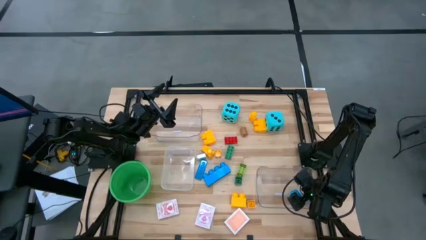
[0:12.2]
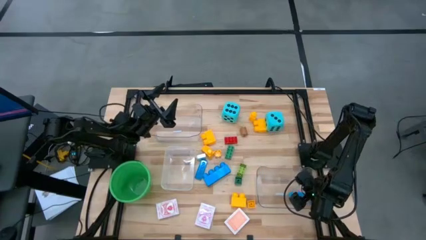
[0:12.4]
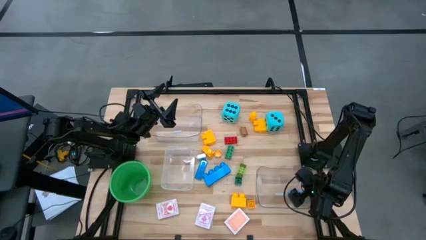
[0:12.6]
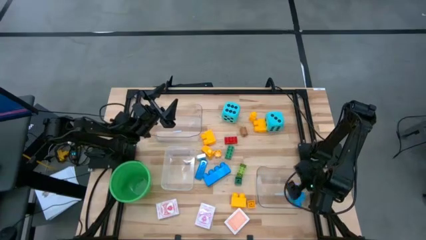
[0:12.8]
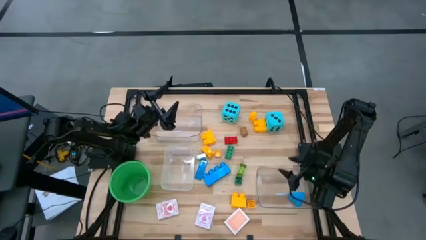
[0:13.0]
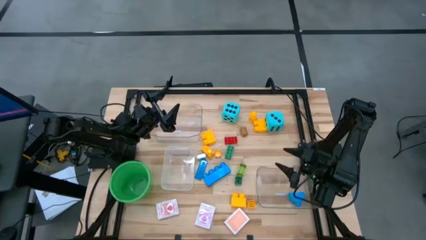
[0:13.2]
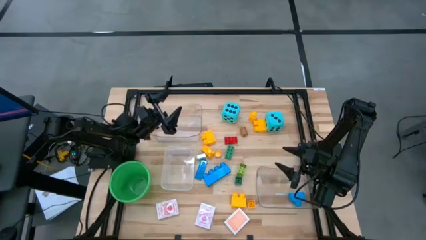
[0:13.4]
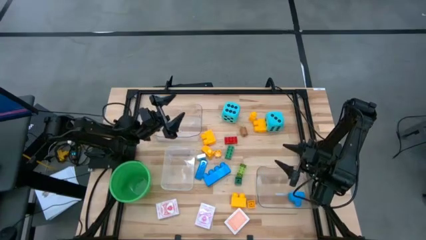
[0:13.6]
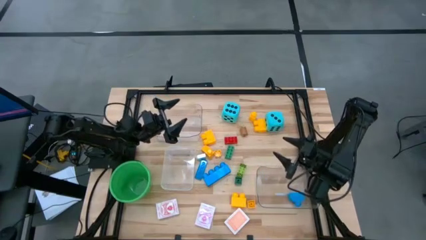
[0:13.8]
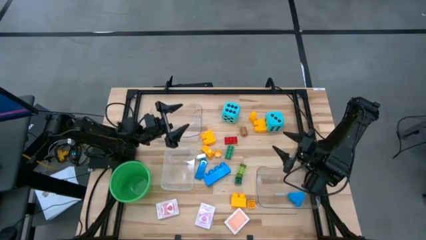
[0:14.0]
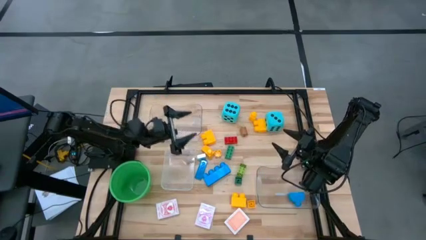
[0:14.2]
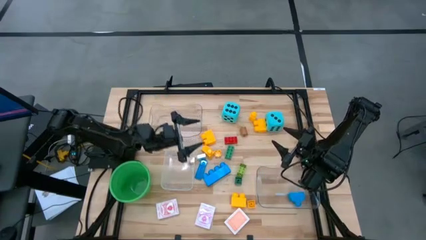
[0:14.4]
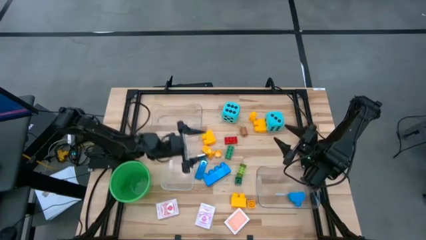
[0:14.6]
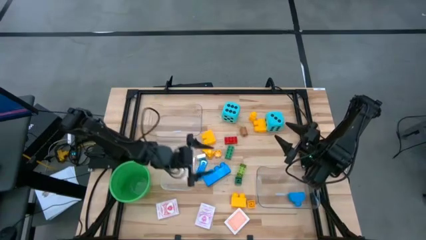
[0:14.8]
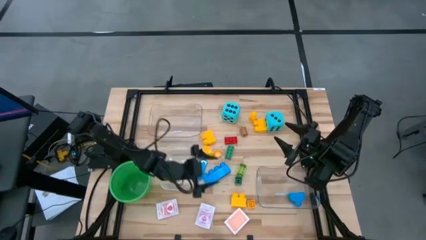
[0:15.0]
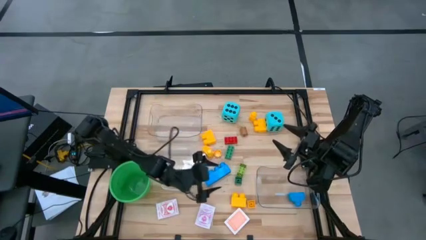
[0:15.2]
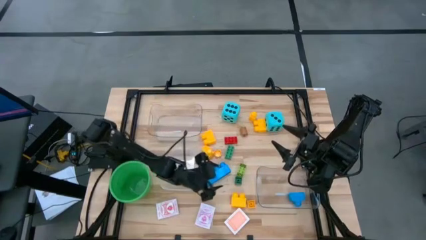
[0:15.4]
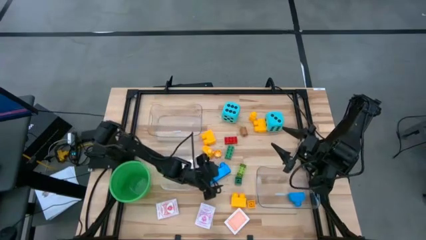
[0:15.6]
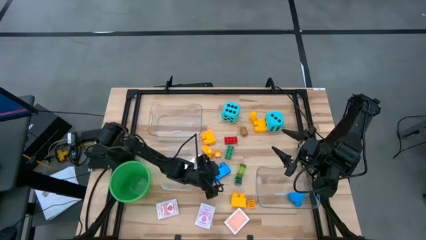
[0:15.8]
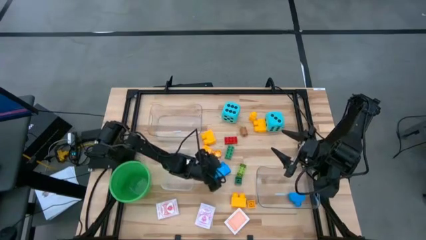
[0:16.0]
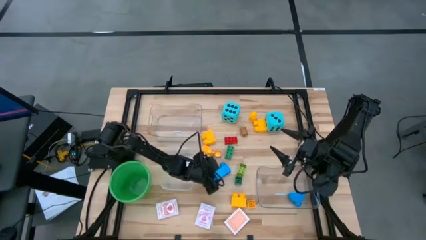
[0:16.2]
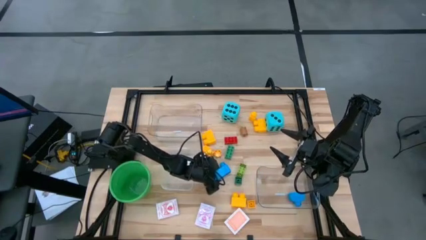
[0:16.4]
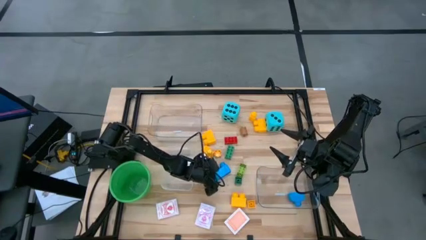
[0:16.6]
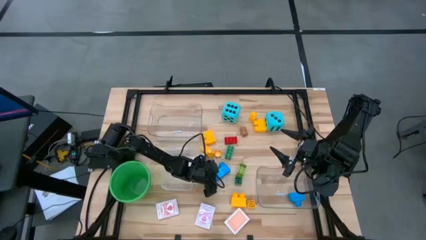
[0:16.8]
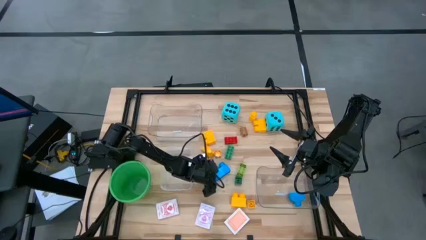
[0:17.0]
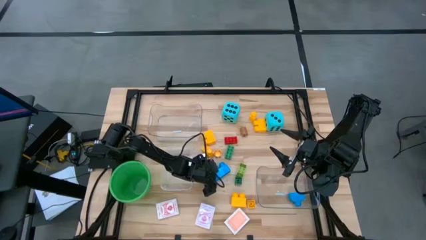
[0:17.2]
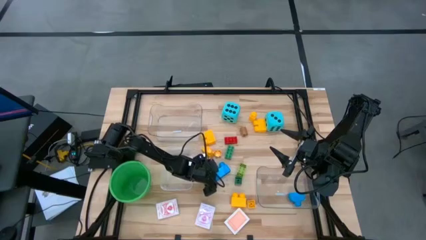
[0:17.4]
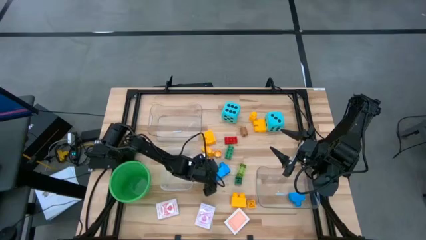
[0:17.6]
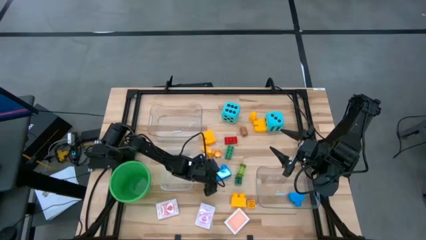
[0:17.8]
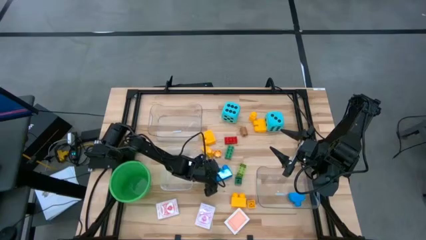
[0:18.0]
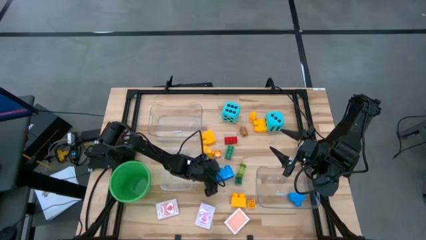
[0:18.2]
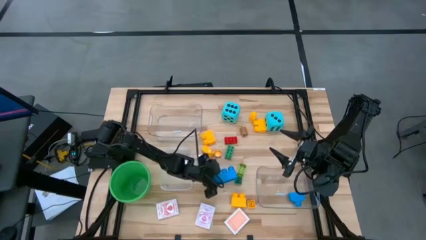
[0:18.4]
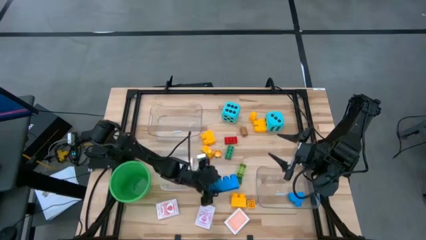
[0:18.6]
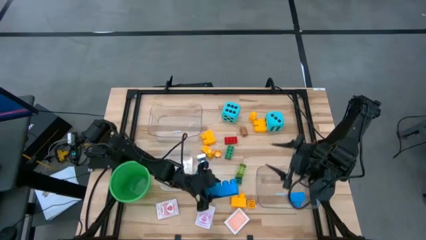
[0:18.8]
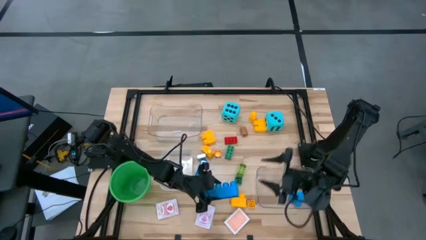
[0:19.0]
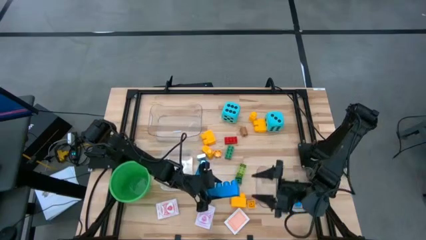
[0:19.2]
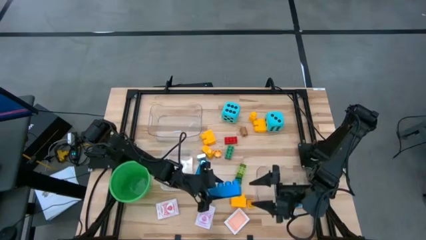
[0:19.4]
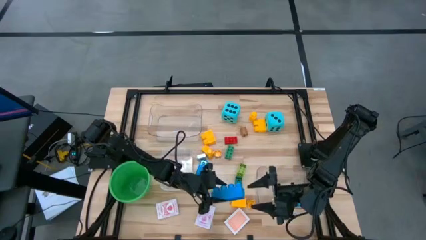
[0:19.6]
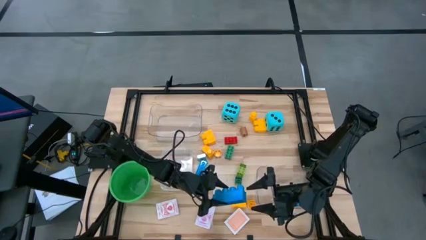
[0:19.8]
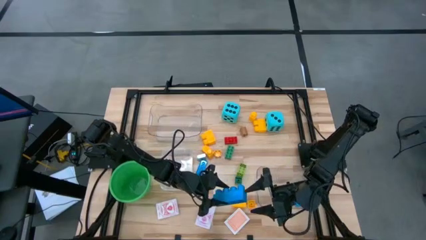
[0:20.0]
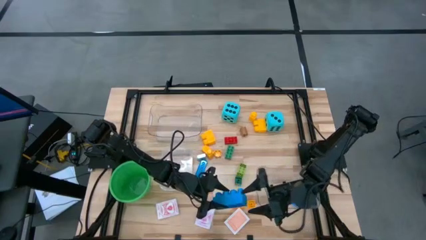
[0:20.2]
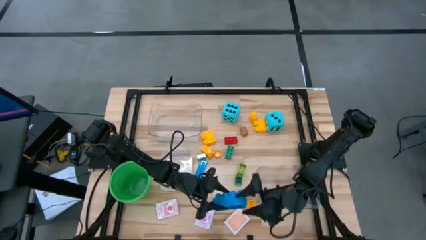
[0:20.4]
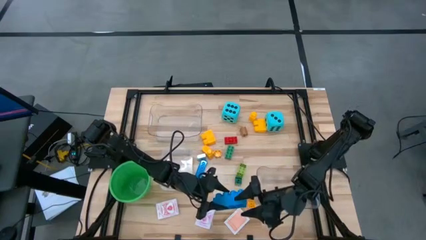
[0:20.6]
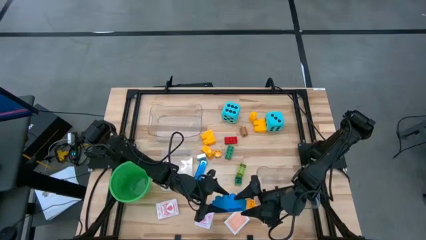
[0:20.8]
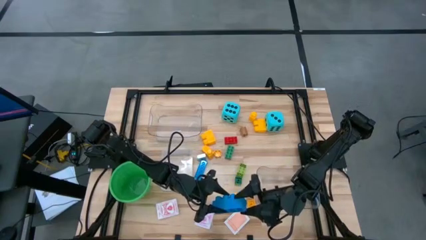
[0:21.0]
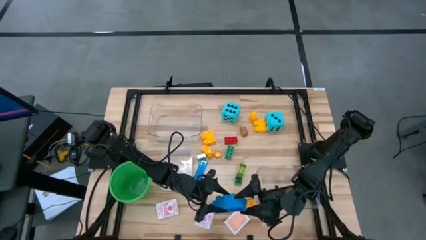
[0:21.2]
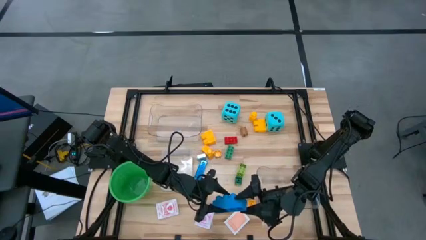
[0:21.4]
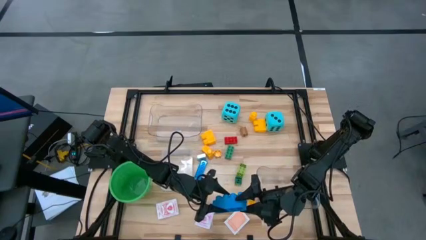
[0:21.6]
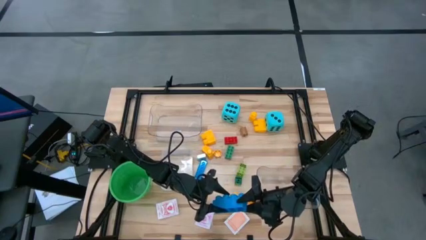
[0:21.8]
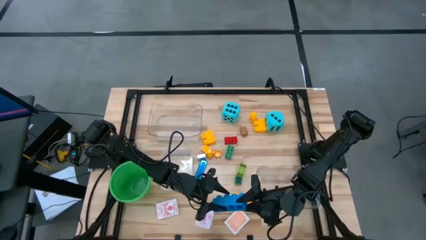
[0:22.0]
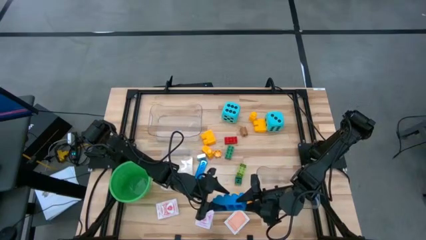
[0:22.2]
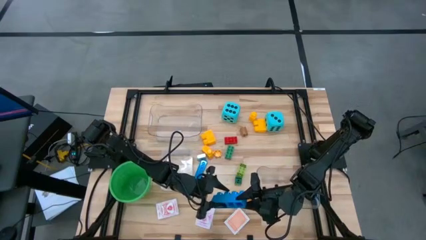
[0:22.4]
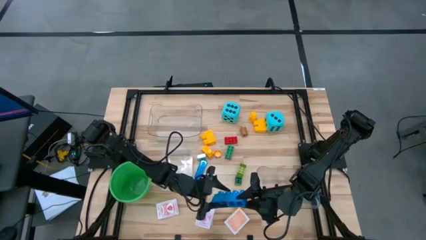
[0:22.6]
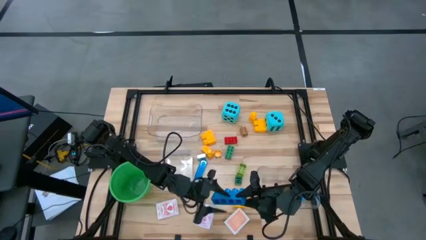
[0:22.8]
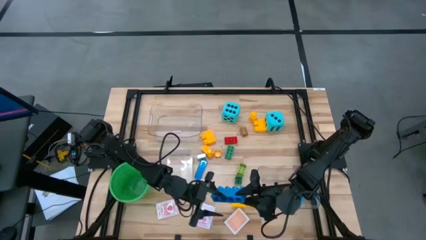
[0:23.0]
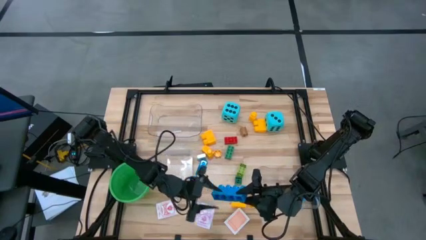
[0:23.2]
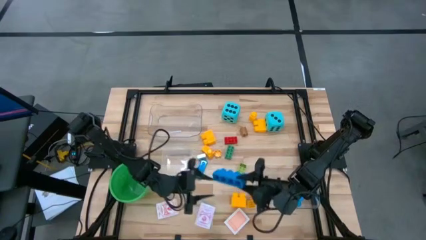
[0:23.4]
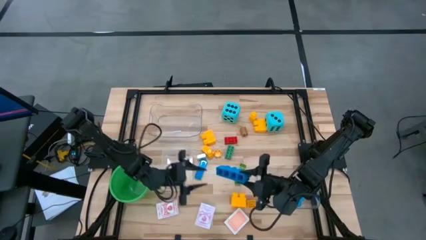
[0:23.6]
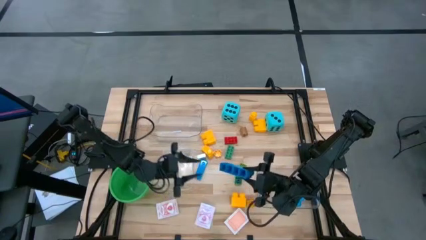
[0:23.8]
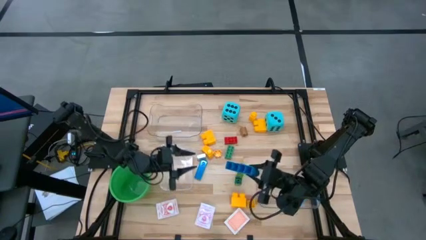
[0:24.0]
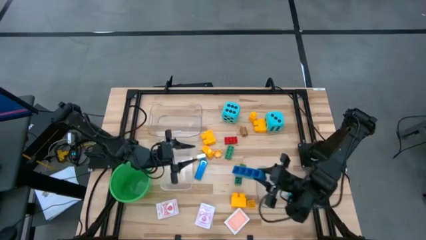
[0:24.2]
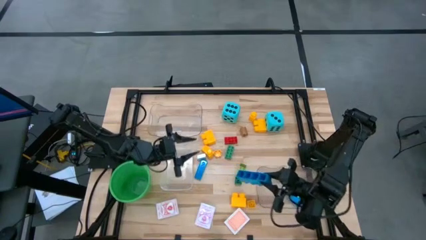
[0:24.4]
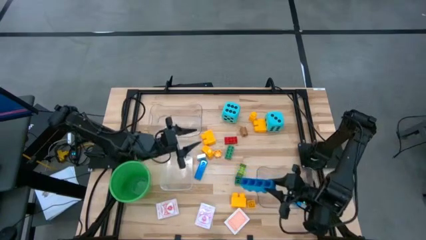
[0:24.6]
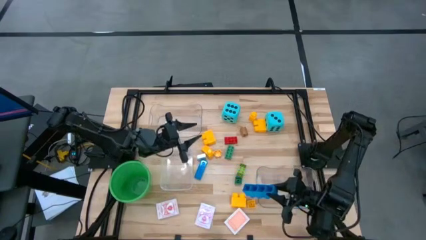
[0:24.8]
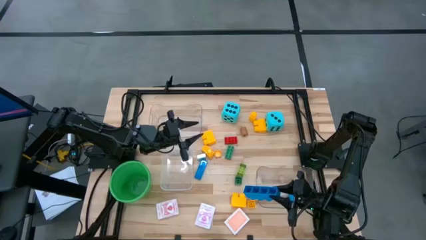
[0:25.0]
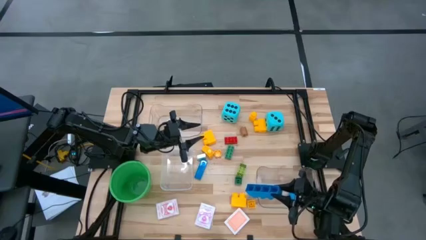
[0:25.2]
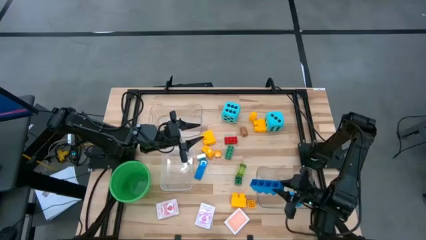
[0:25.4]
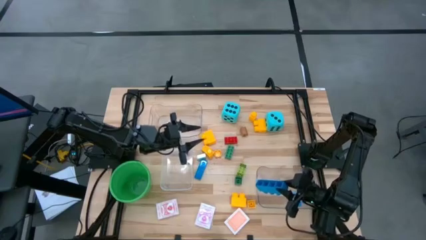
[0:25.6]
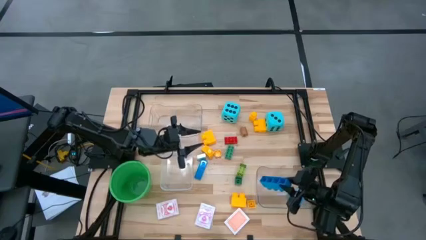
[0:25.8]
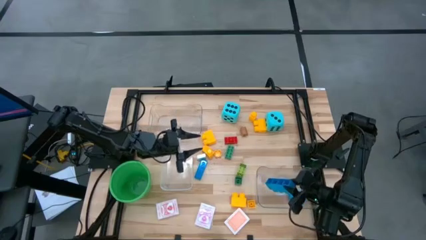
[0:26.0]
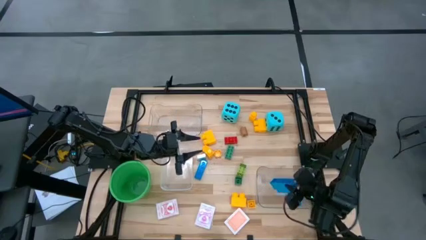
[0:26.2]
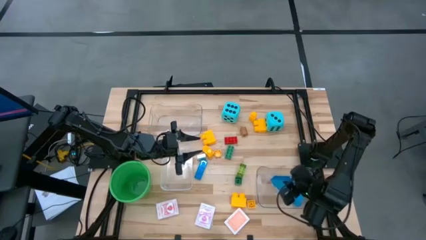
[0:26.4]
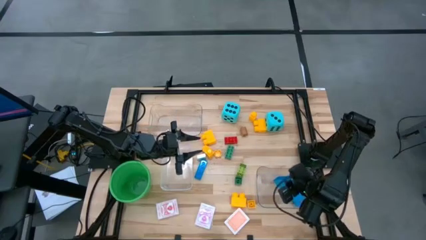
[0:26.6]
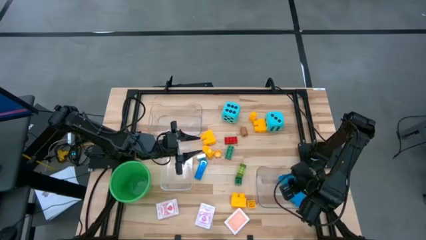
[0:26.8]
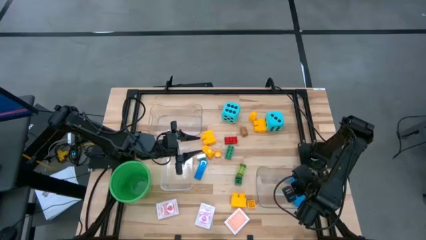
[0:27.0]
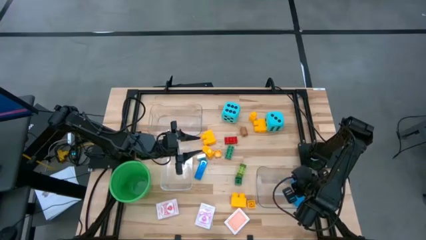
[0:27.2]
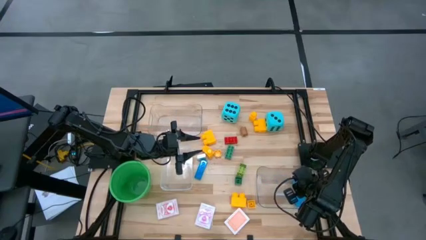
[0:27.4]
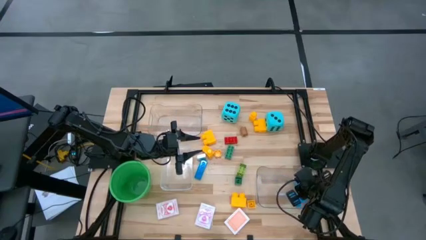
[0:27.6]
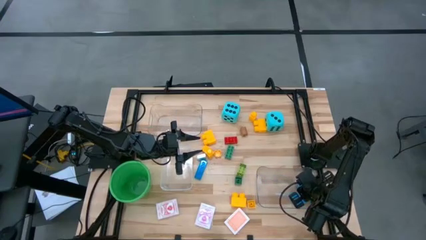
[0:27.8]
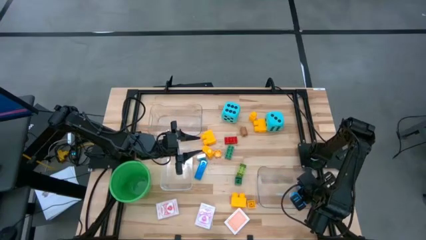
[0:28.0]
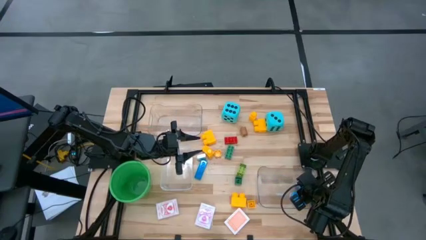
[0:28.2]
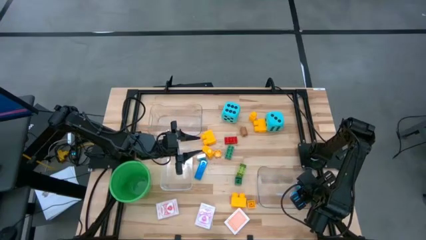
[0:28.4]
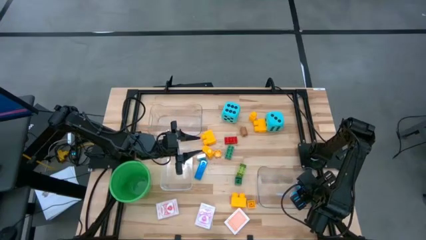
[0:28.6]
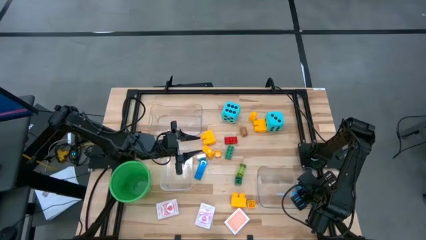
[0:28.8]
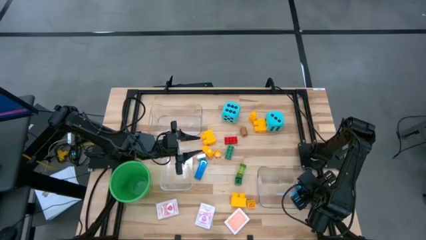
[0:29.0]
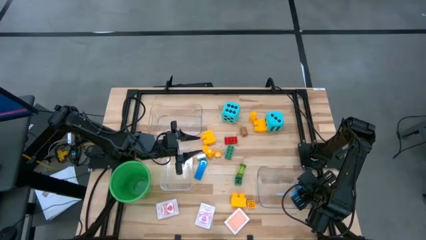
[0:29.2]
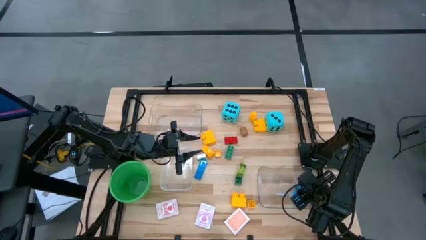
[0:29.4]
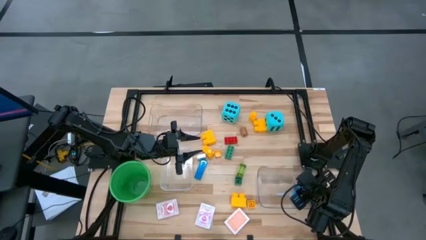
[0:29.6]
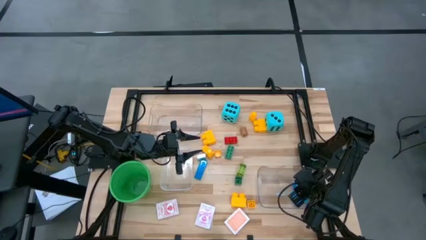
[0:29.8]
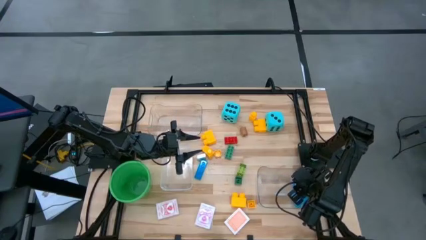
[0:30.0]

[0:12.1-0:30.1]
Task: Pick & Place Toys
Put the blue game piece into the bottom right transparent bin
